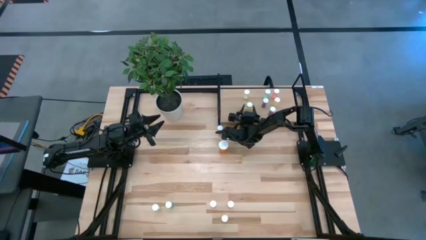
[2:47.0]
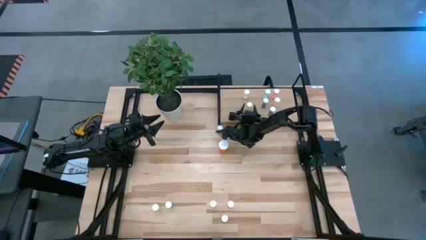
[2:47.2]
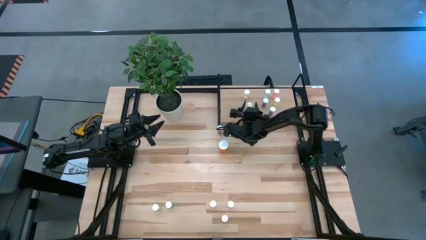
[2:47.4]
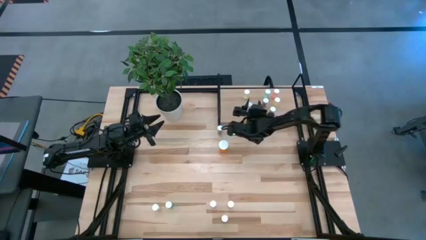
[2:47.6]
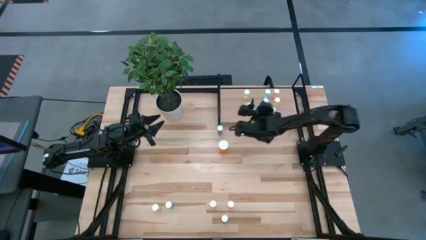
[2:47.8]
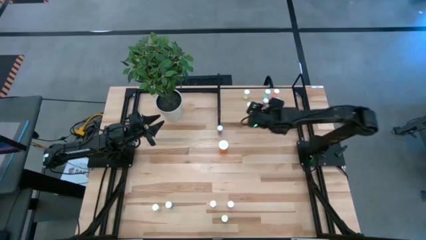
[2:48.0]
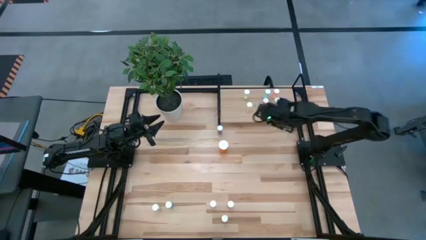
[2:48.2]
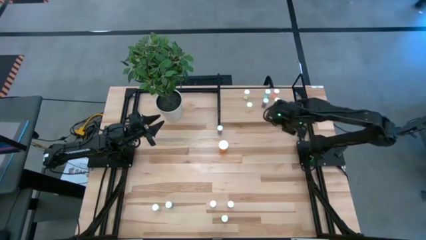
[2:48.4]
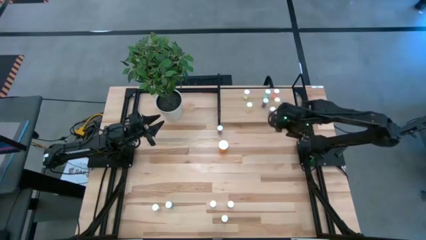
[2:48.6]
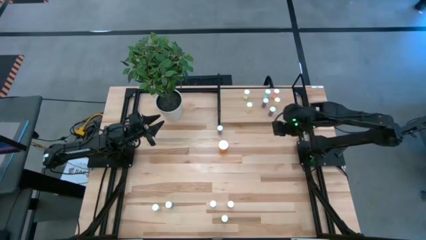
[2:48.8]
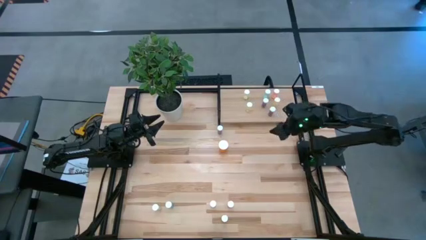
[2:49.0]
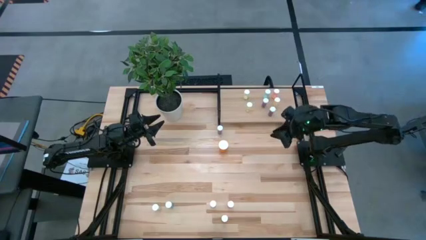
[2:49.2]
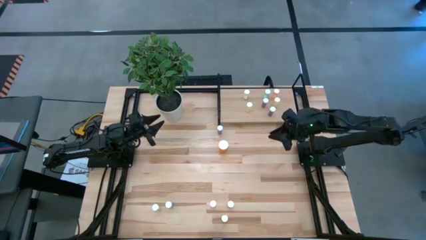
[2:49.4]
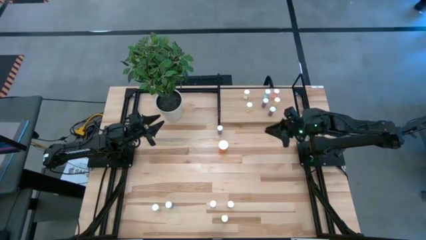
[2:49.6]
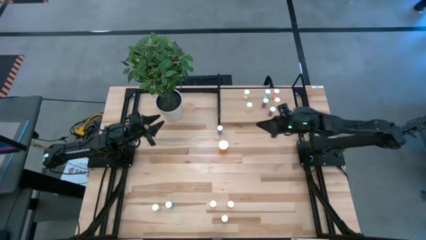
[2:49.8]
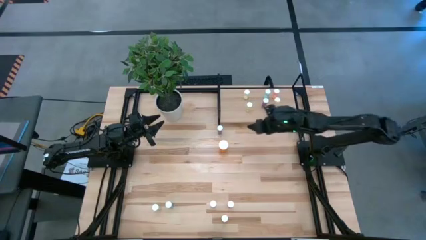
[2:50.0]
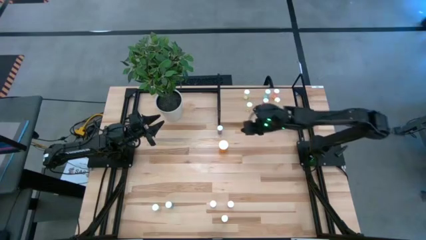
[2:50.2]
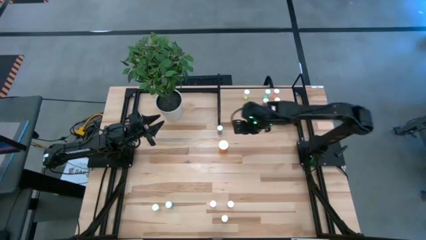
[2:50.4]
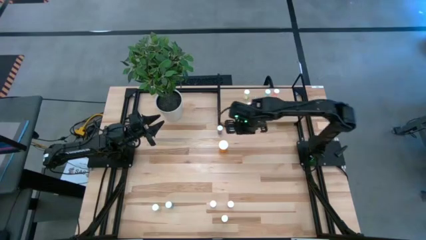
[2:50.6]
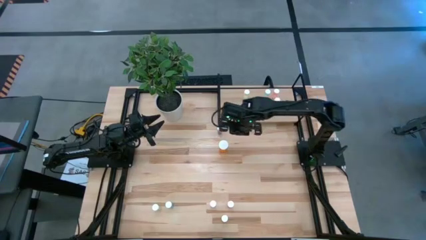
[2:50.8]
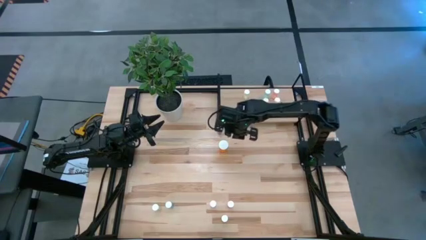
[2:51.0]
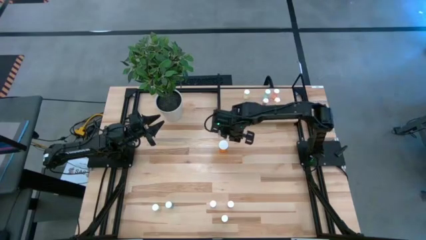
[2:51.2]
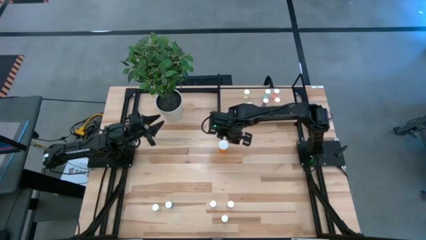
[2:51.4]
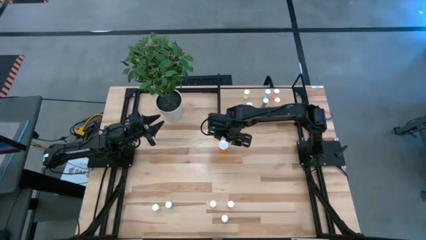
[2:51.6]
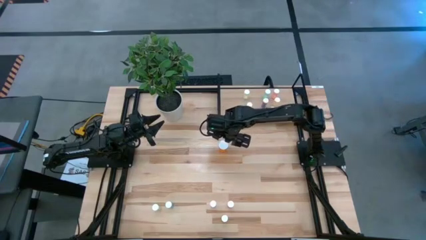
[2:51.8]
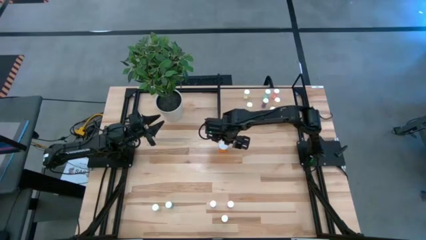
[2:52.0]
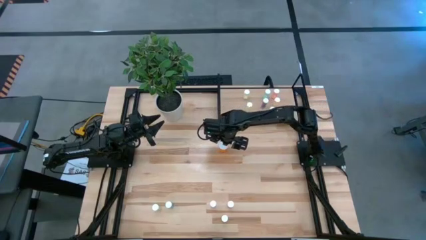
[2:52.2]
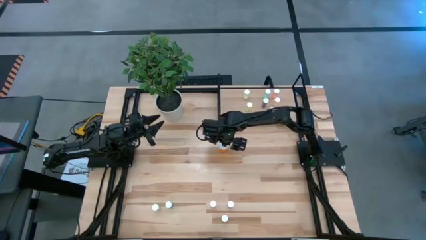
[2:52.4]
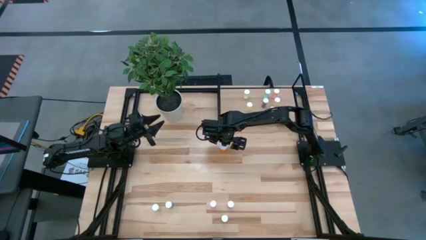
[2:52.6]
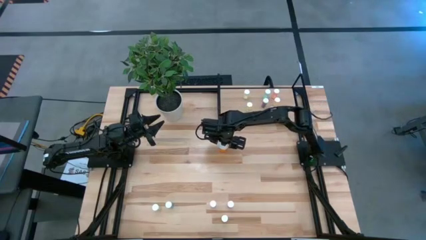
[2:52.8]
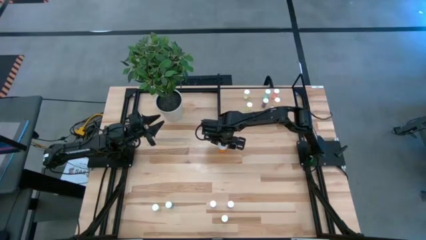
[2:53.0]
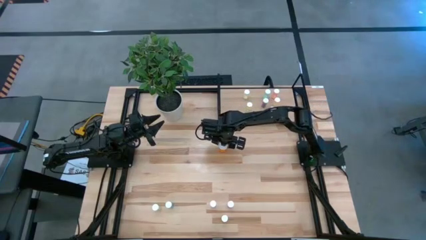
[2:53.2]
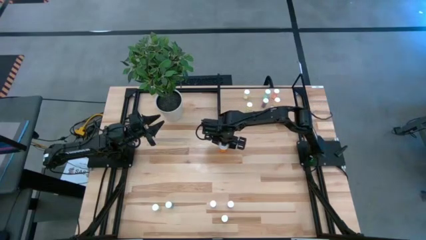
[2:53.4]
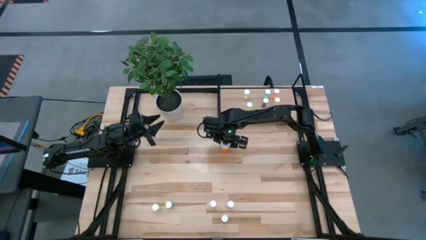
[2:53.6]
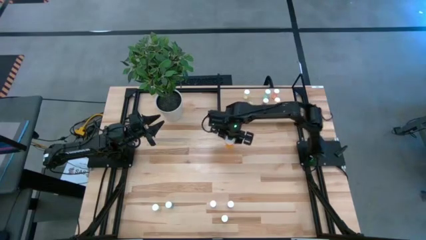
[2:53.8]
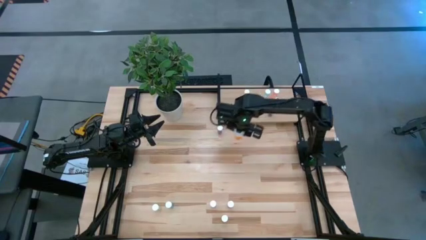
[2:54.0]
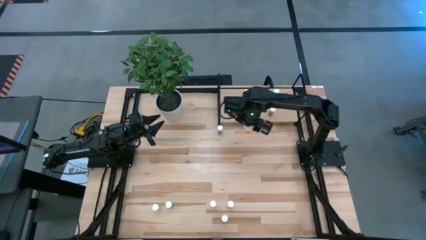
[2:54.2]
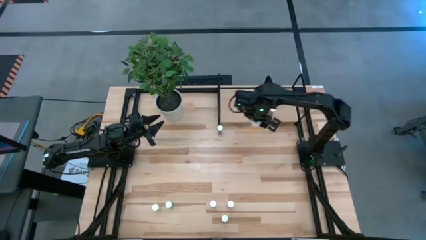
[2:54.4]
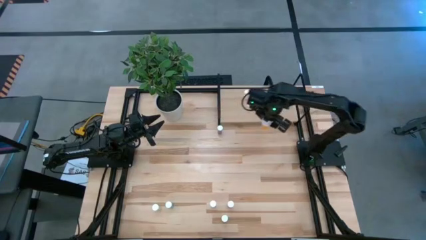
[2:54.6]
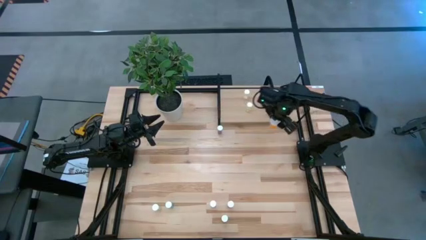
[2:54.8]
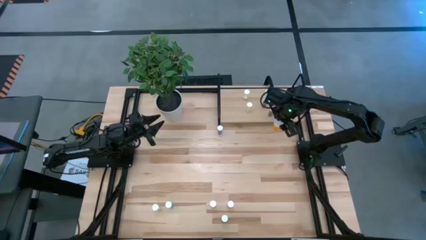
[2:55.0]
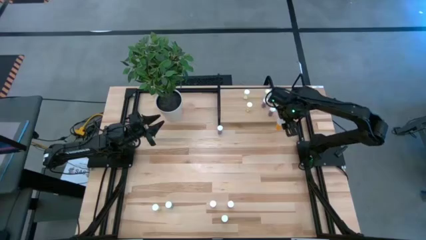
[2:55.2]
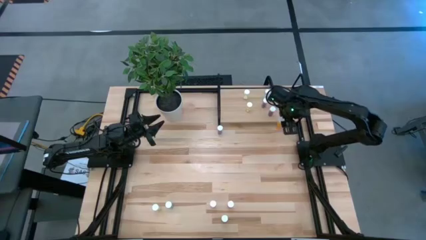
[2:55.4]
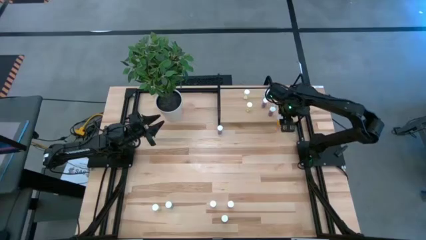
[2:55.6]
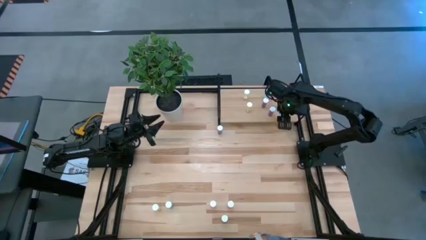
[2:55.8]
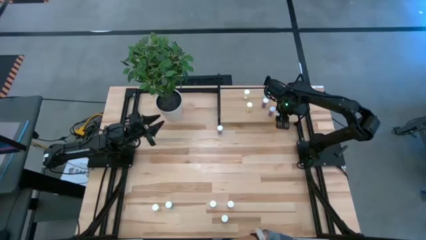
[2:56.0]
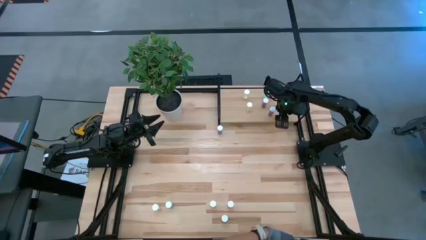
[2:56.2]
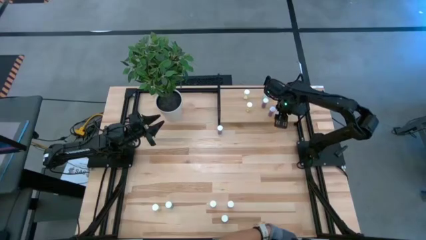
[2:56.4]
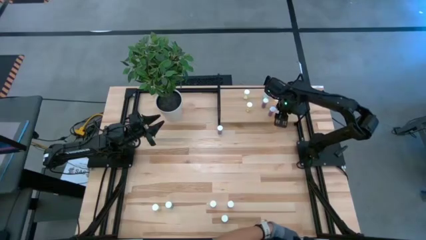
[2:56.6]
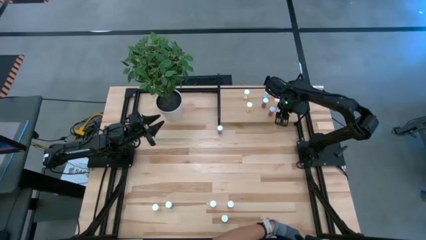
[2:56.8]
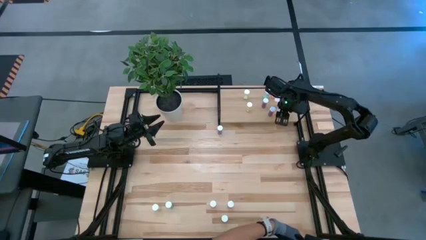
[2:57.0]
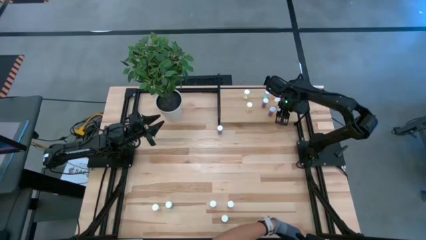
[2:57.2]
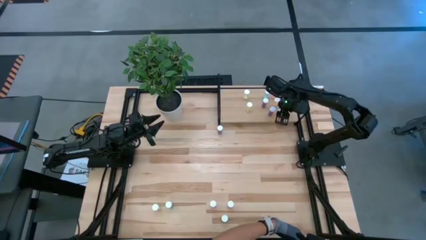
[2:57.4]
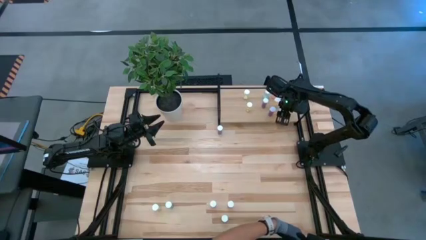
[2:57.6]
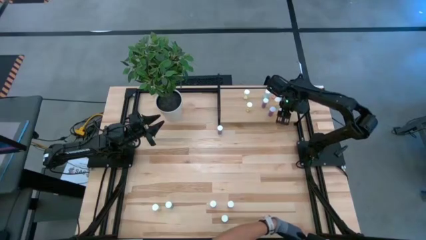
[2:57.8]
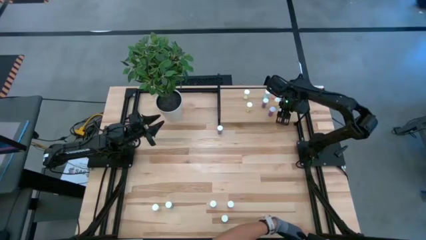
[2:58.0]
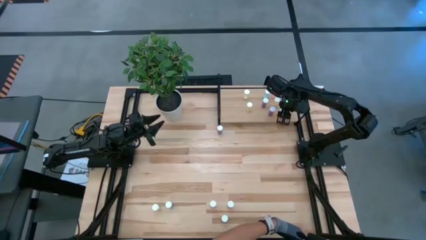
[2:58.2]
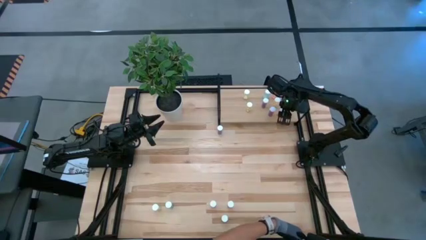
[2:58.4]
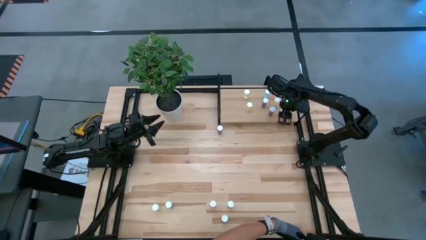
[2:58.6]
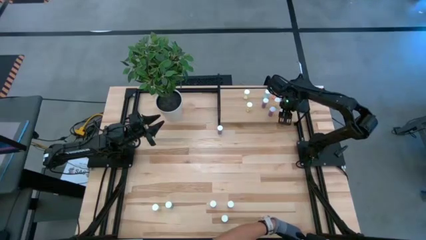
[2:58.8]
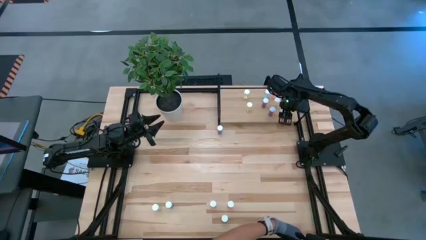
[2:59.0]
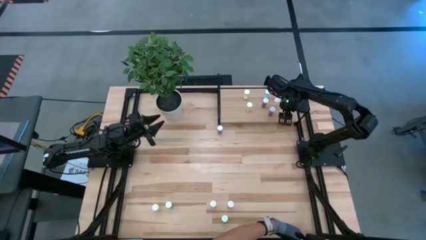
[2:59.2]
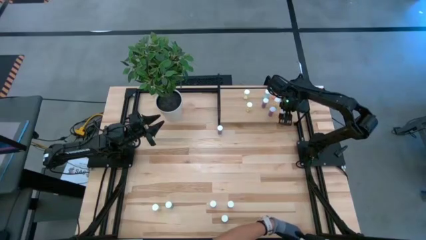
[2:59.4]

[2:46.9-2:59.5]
Task: Pick and place medicine bottles onto shelf by color
Put the orange pill bottle on the shelf

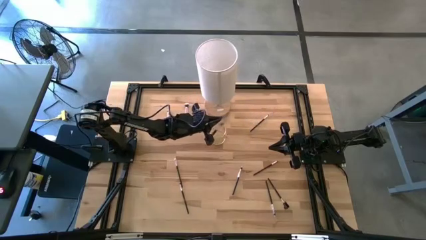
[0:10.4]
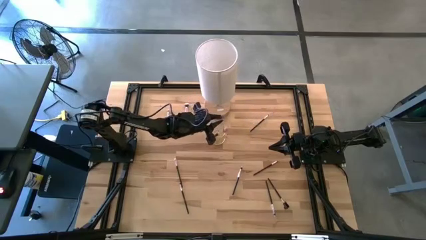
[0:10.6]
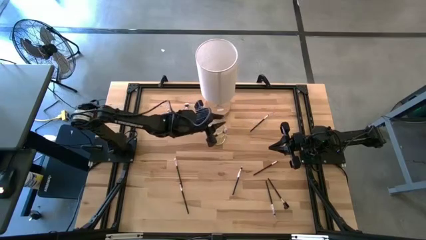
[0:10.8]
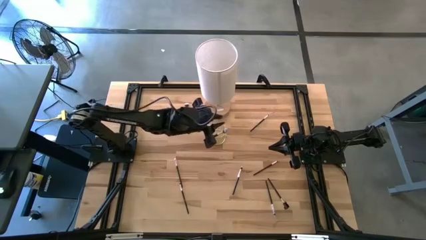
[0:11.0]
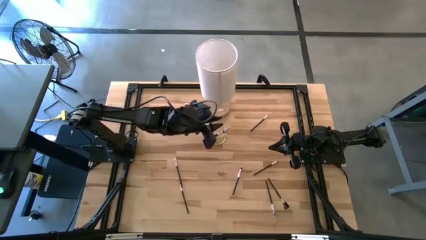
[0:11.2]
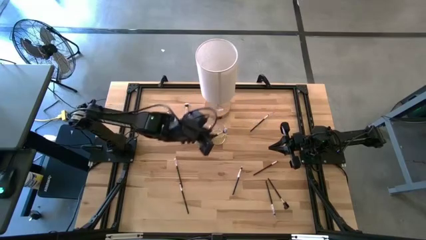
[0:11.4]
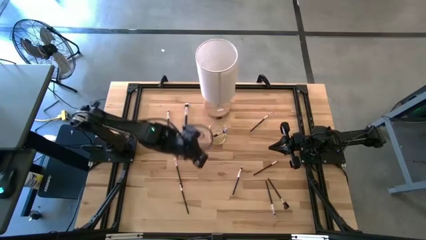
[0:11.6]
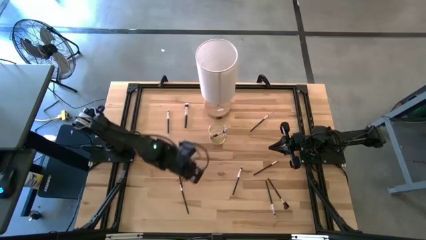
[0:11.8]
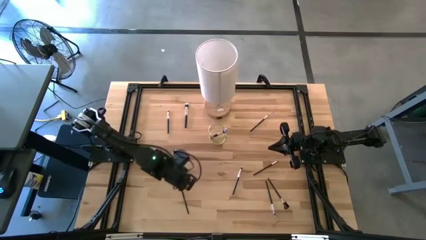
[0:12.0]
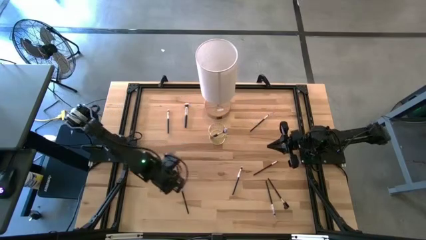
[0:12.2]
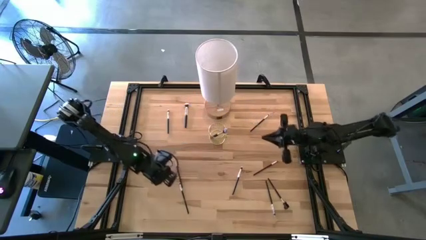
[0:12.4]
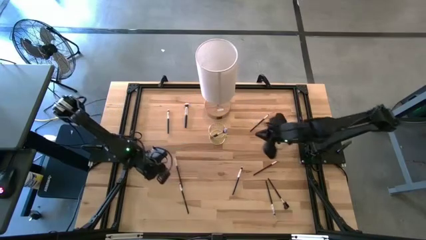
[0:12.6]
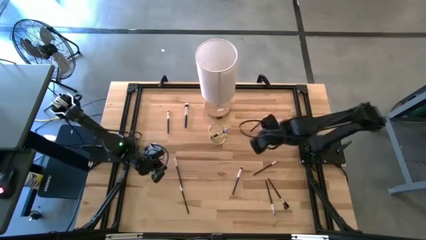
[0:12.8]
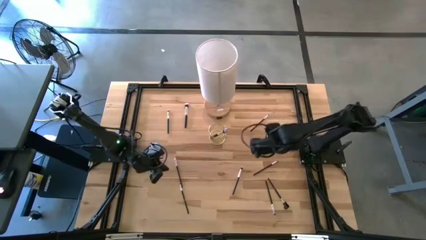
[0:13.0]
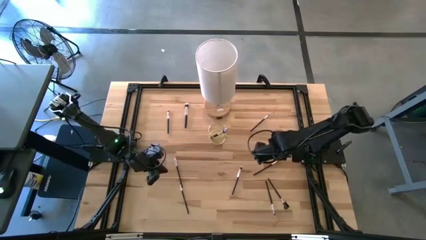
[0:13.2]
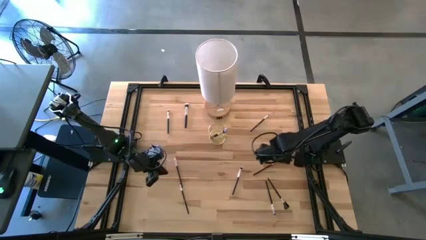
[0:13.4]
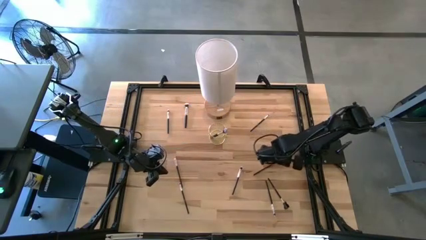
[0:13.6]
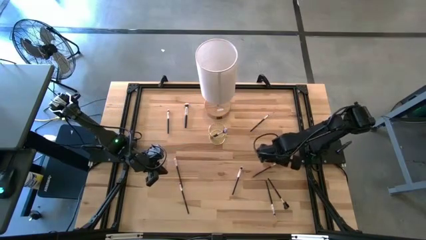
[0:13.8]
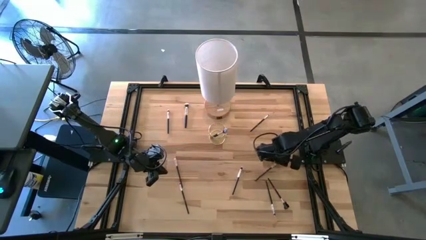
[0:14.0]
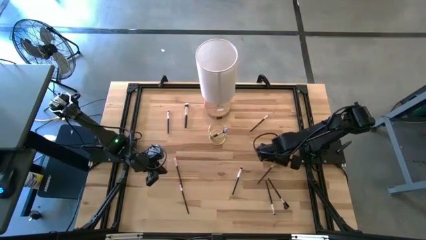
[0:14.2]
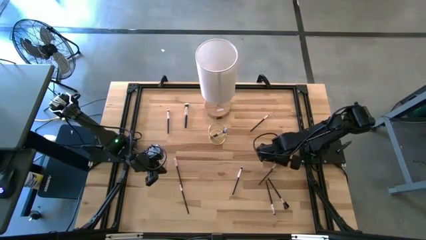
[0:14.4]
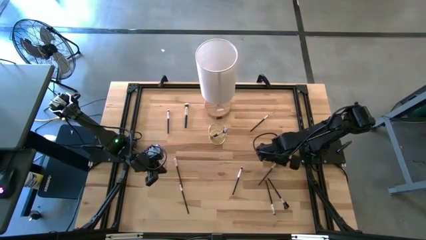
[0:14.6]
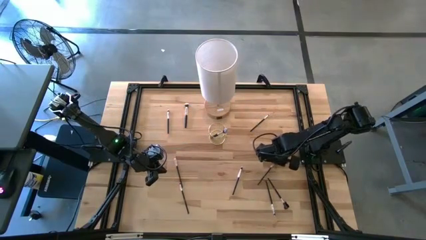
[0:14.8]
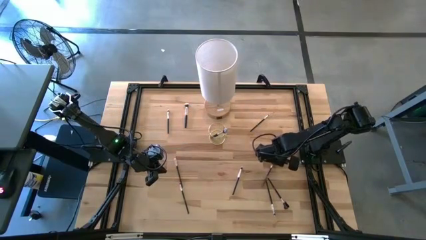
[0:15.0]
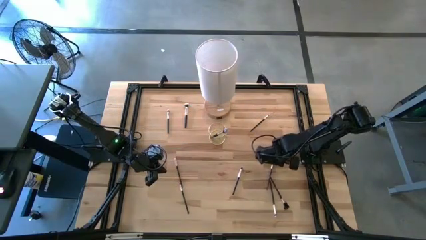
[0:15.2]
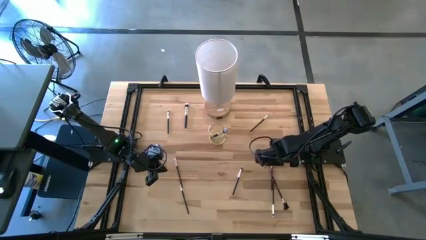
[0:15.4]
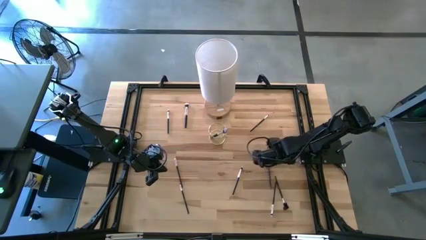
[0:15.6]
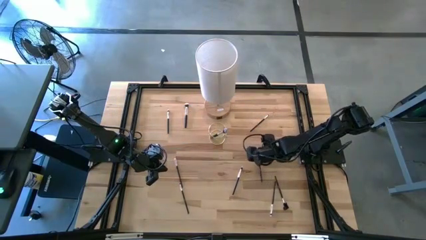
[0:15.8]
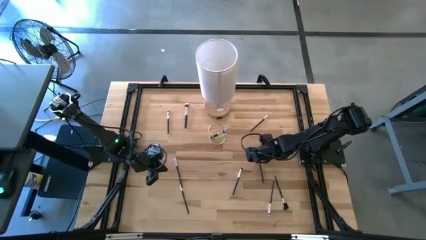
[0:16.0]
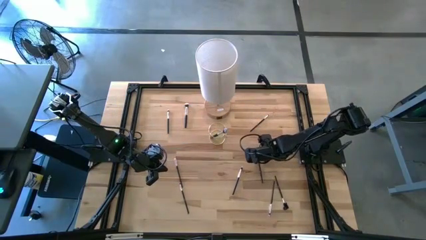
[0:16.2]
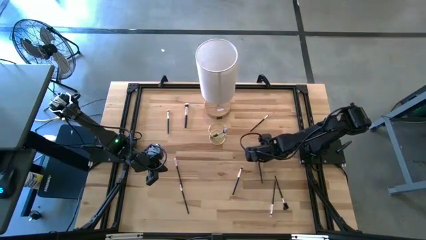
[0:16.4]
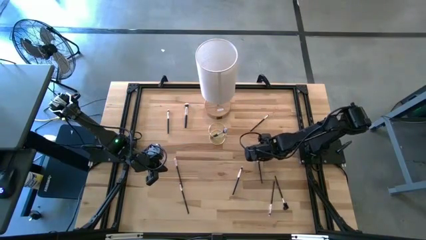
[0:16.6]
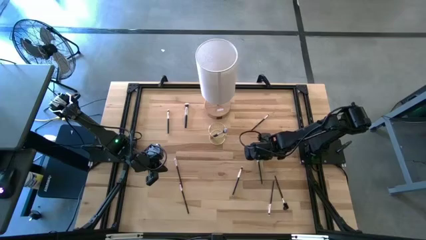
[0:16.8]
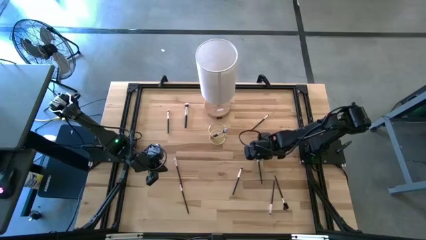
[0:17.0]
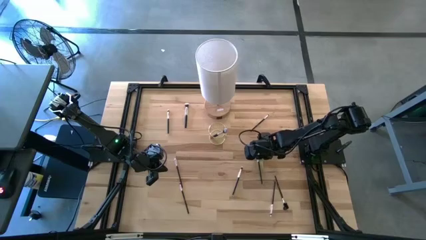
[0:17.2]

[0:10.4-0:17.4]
Task: Put items in baskets/containers
Put the black liner brush into the gold pen organizer
